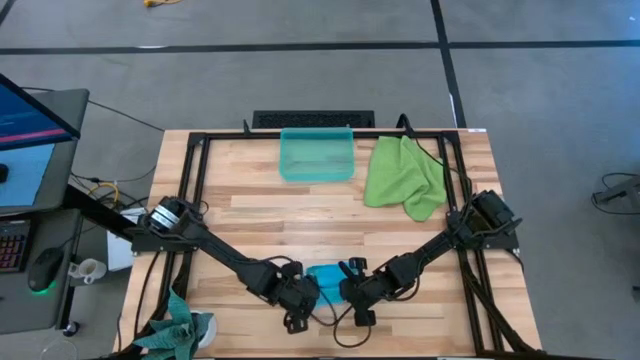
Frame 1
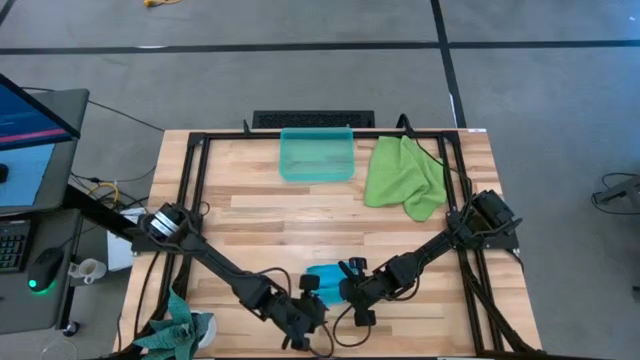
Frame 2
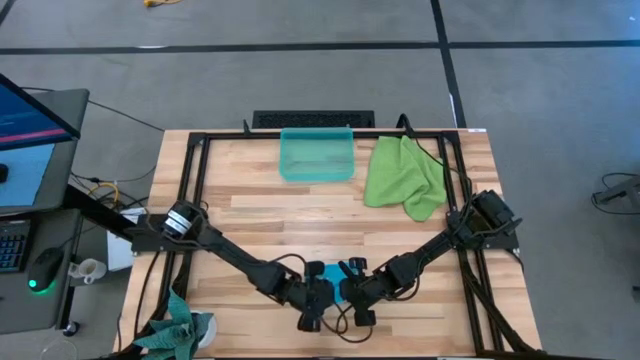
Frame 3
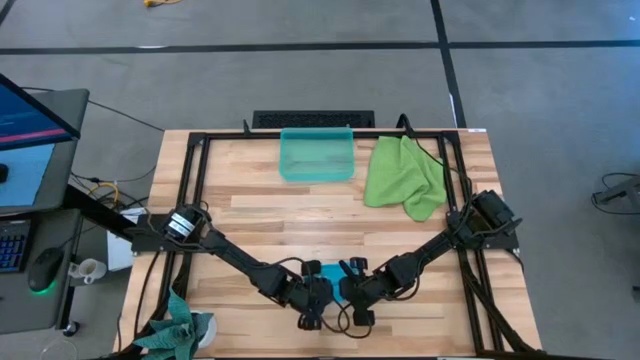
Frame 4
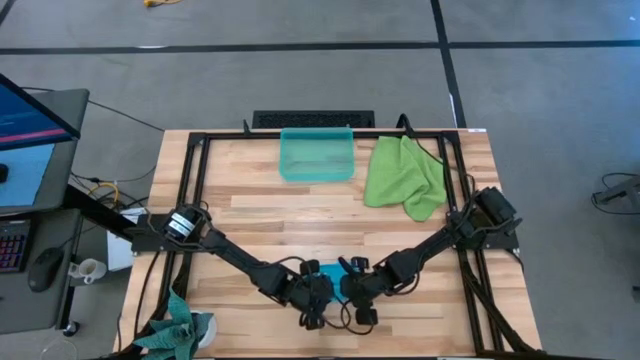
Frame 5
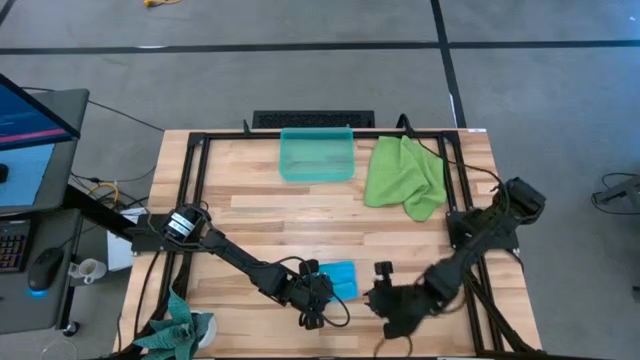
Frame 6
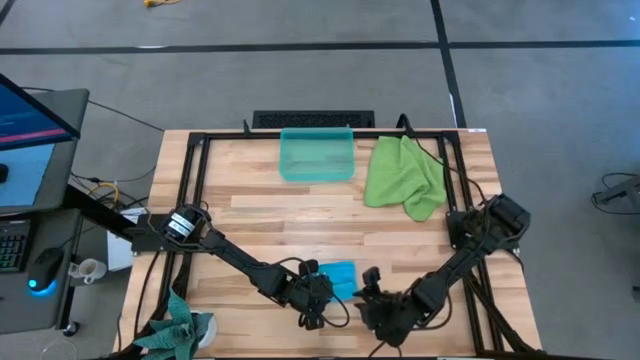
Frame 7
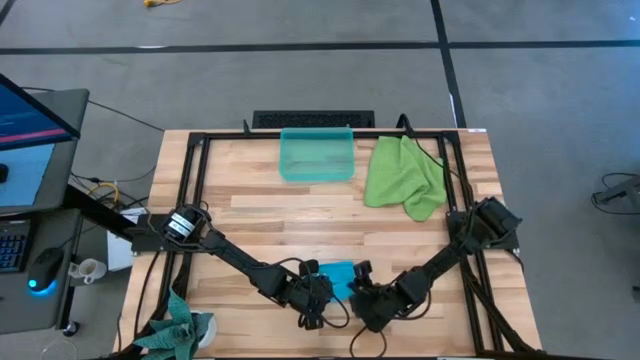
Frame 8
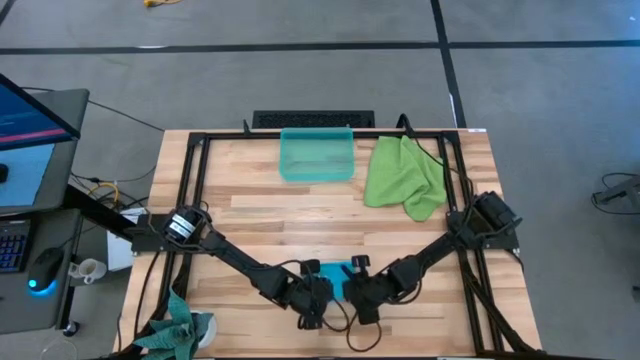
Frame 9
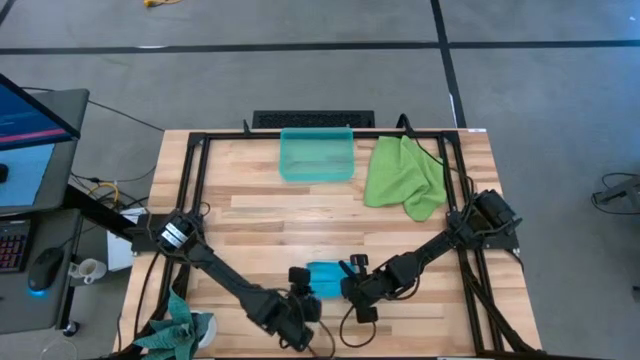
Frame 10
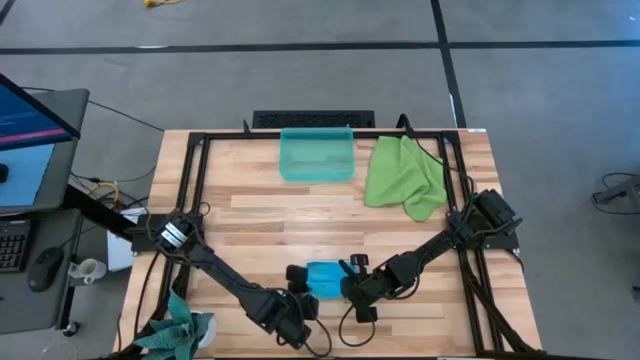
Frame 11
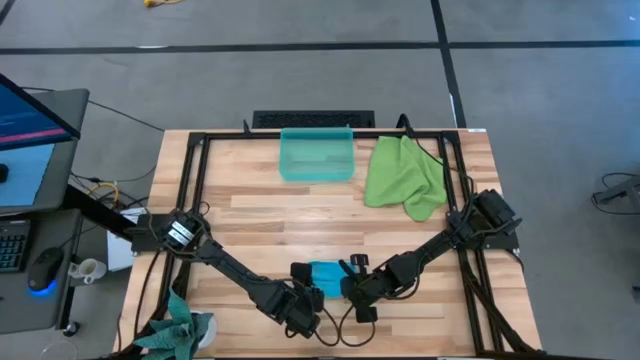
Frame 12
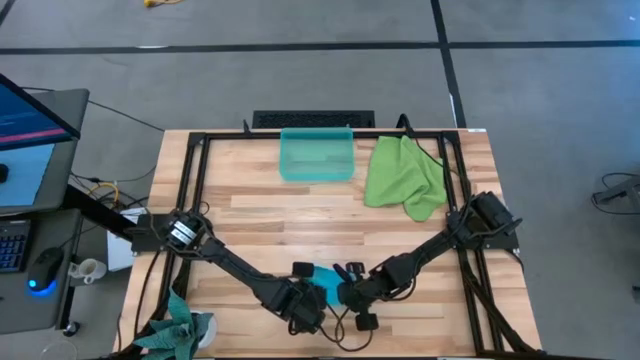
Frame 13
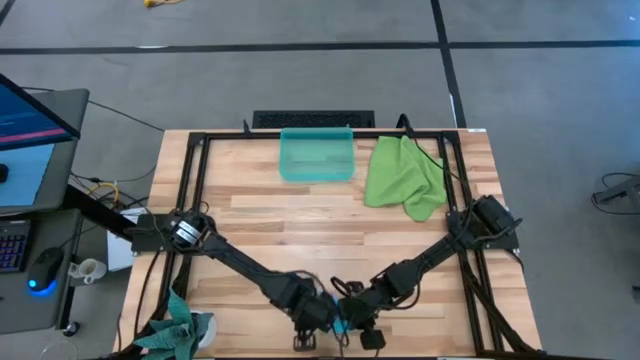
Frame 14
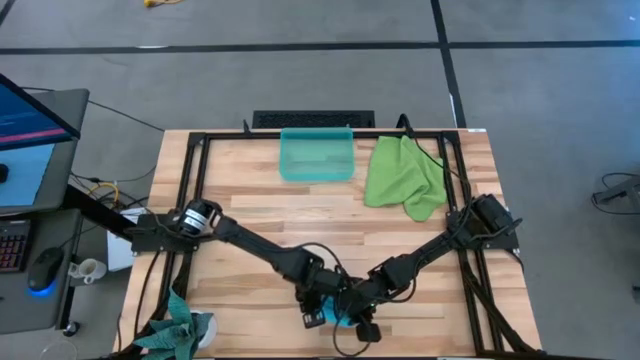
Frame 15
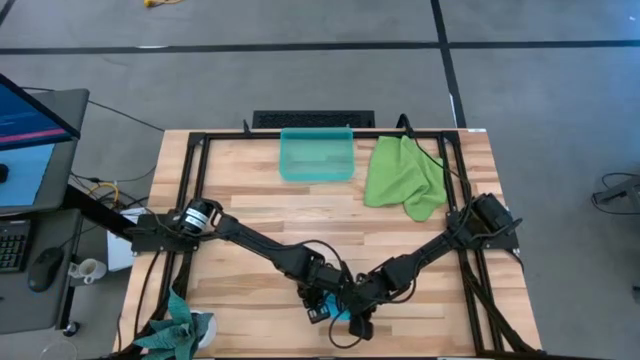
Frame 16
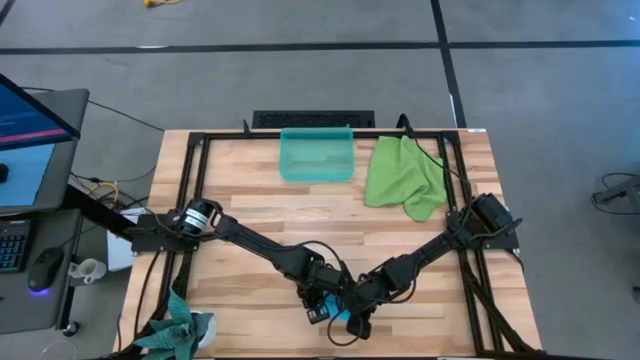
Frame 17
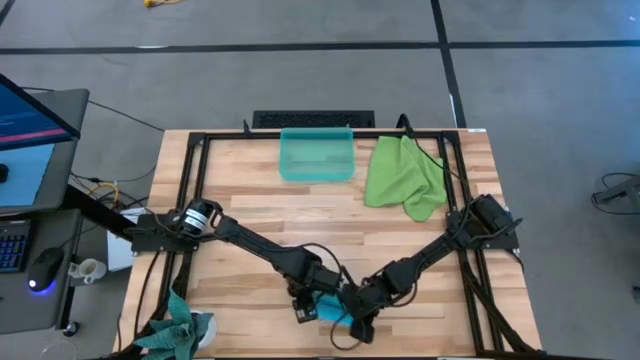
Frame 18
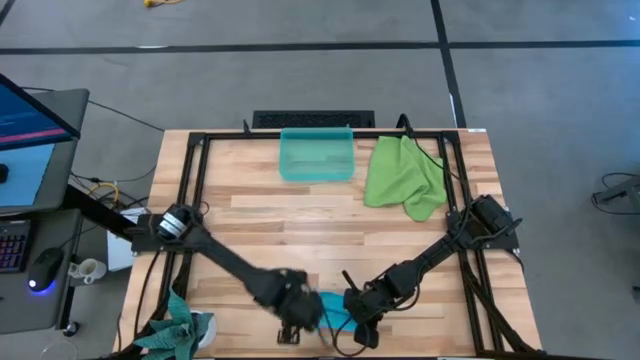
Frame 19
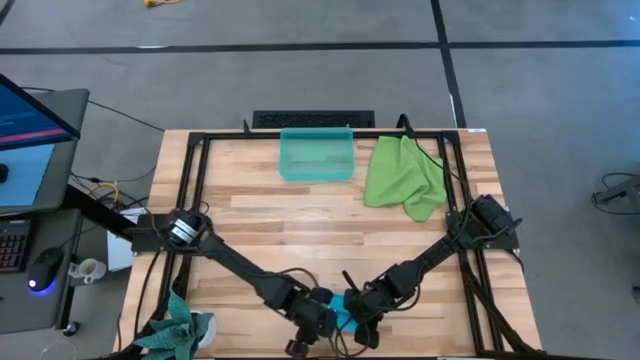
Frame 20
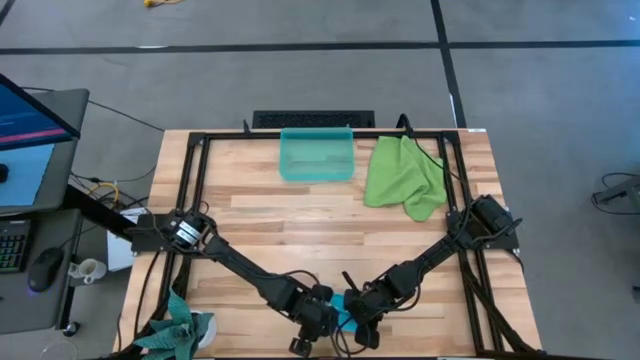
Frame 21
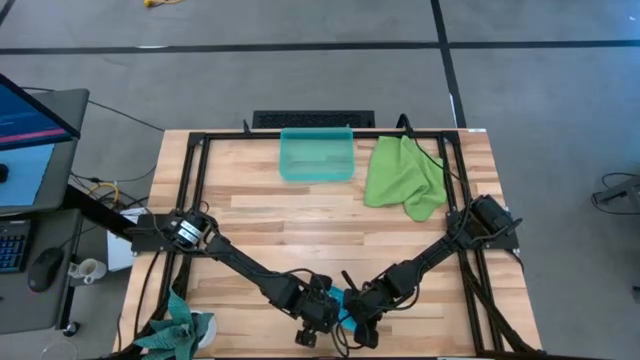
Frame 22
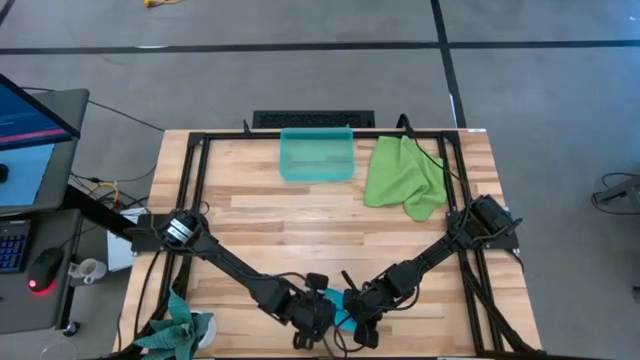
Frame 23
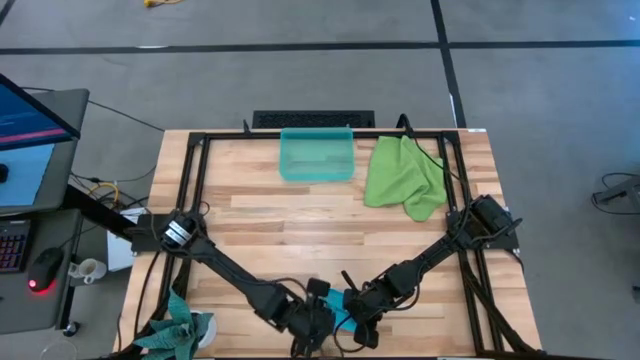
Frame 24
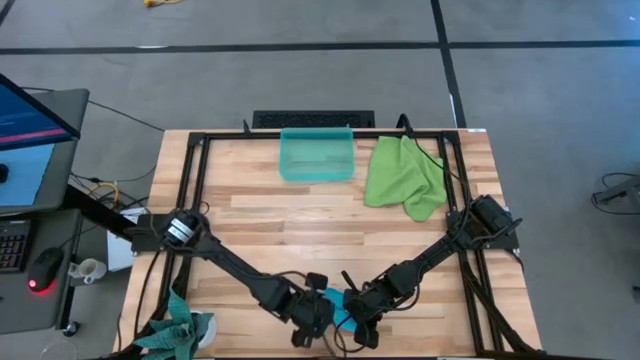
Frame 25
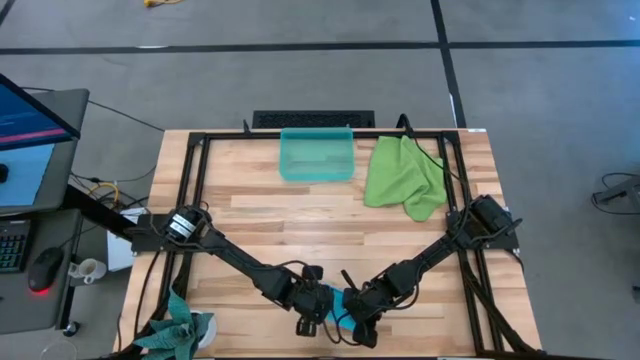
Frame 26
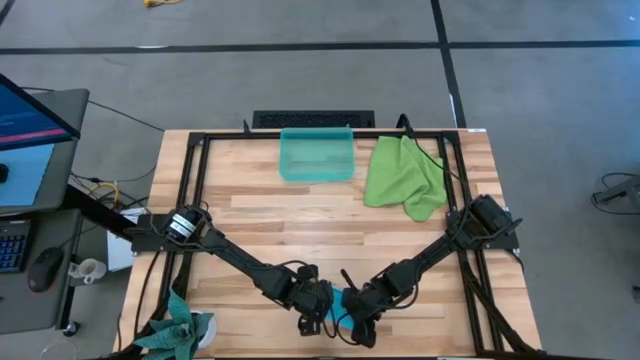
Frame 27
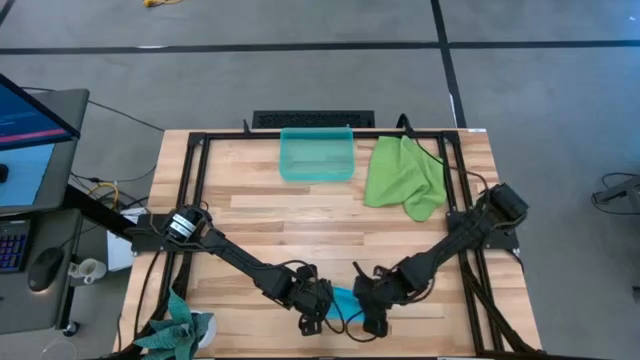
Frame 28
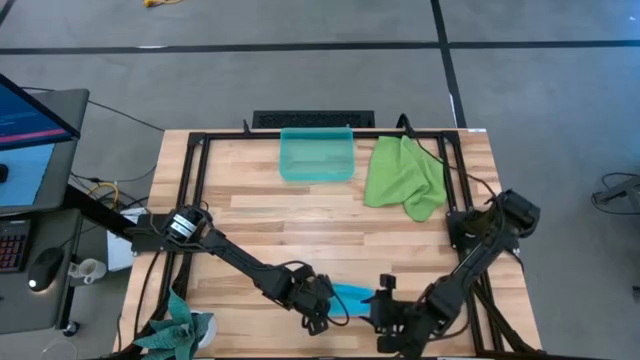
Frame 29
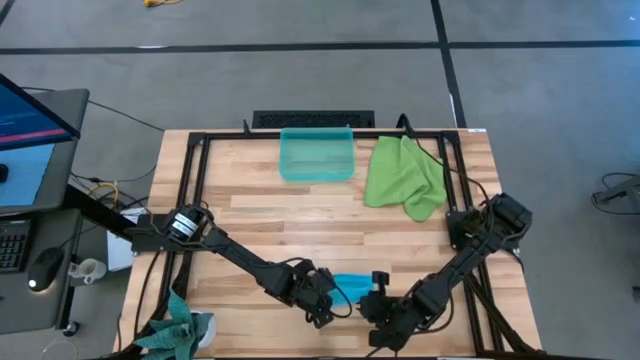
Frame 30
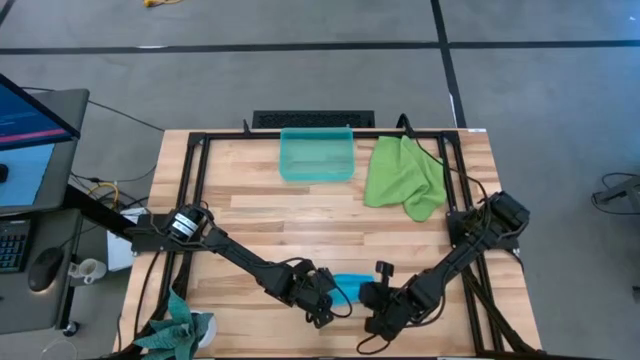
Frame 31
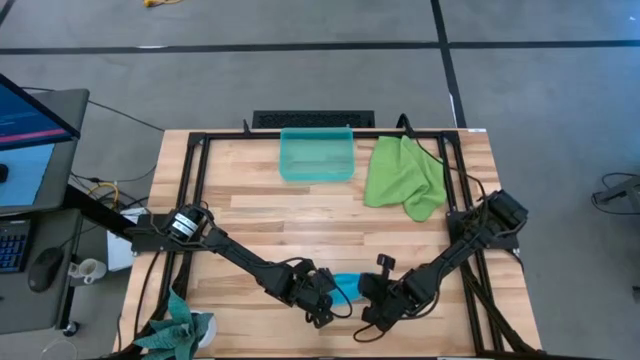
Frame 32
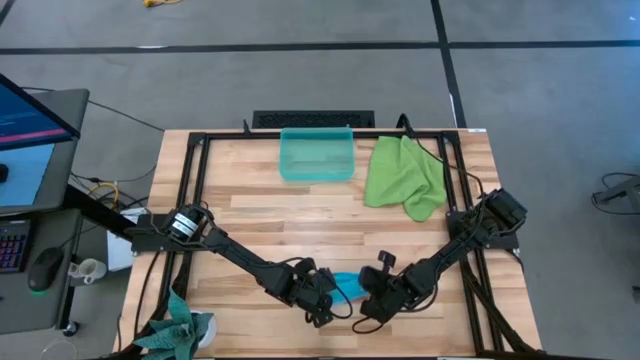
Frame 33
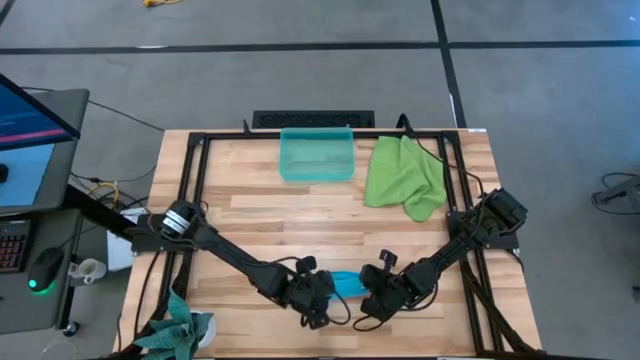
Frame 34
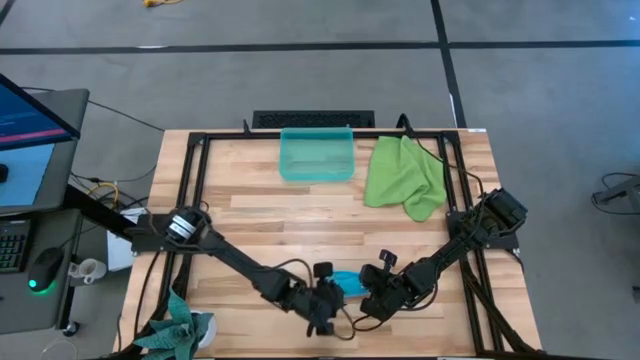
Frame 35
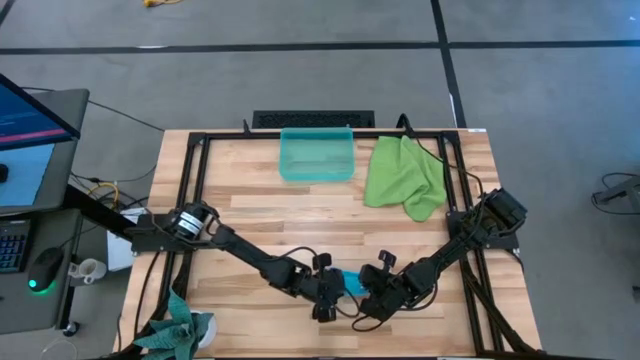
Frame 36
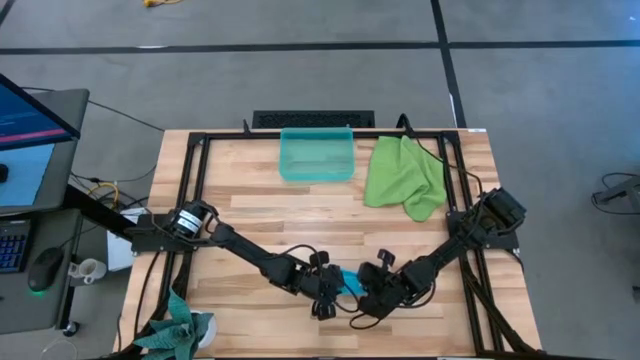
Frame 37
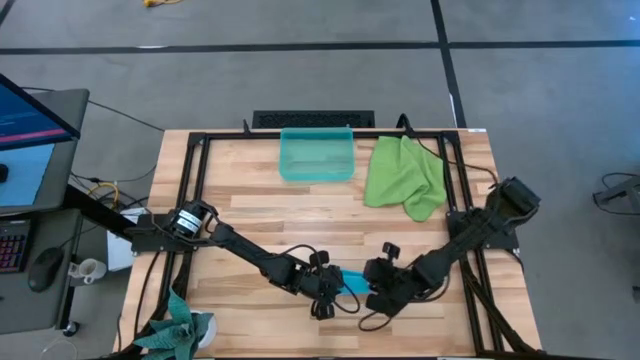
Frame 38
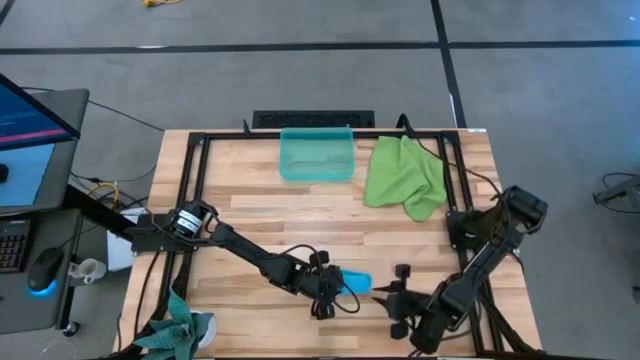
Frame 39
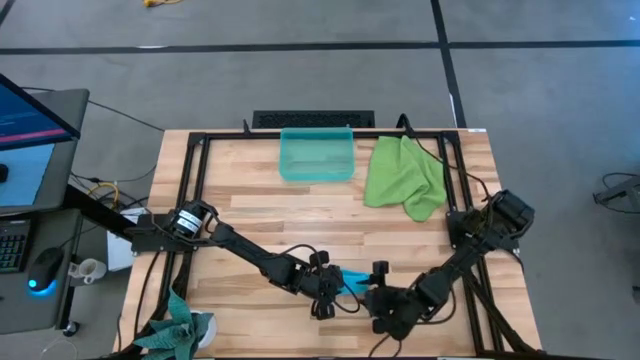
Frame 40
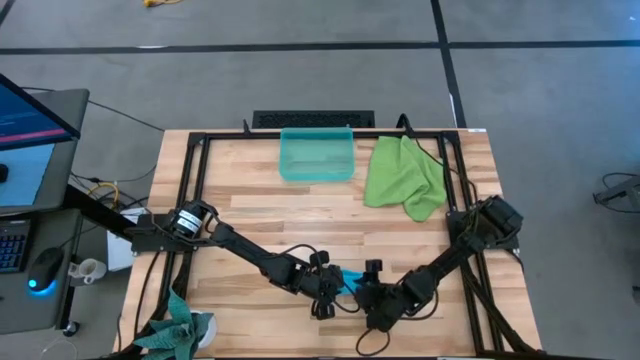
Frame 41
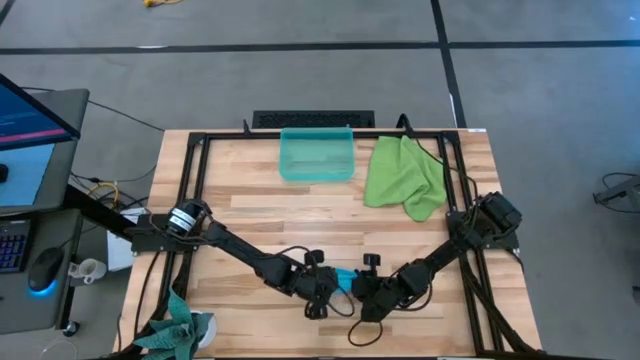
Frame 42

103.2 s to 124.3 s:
Task: Roll microfiber towels into tight, uniform cylinder then place into a basket
Roll the blue microfiber cloth
